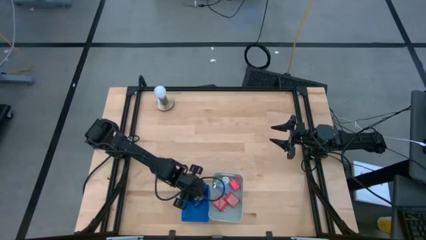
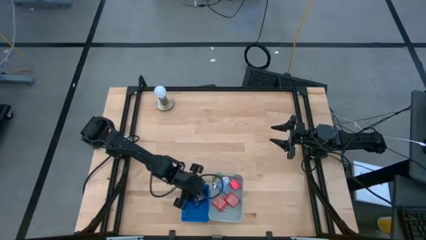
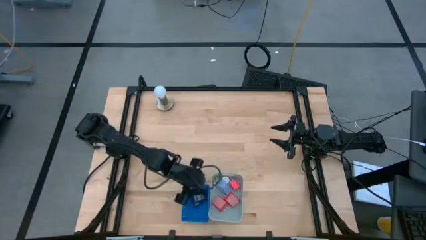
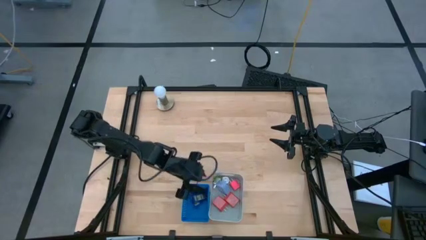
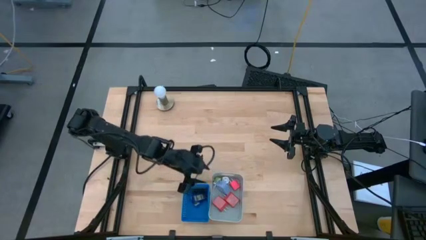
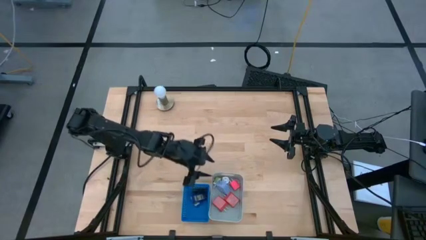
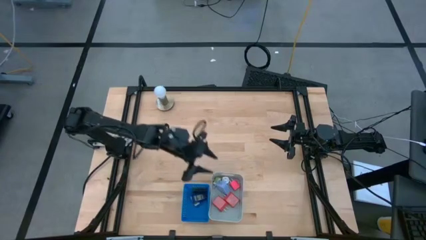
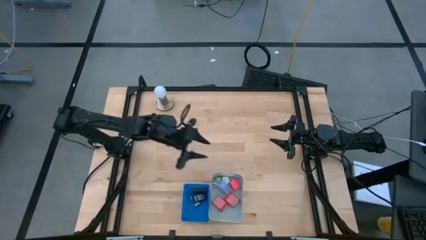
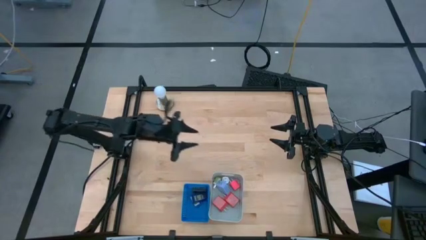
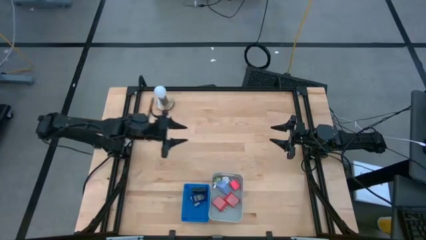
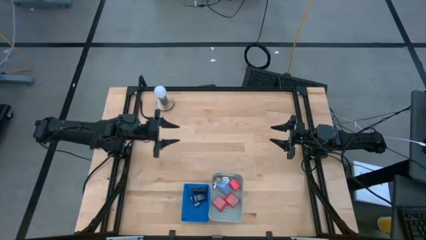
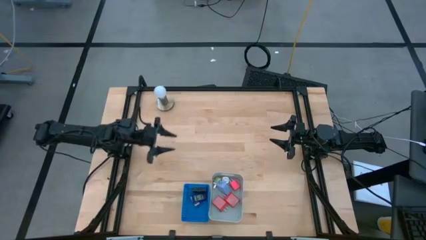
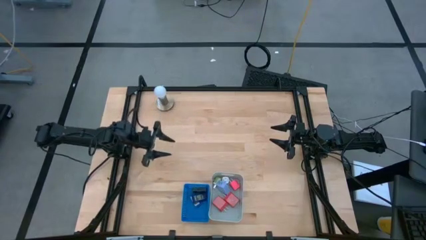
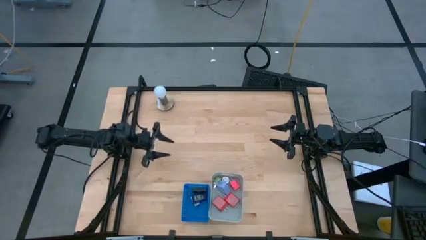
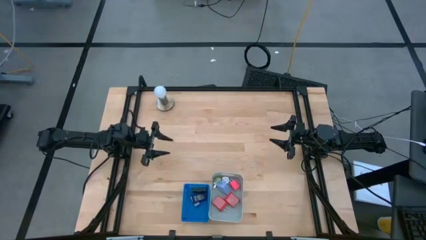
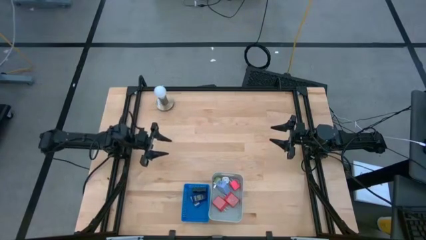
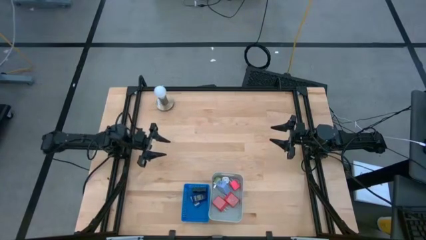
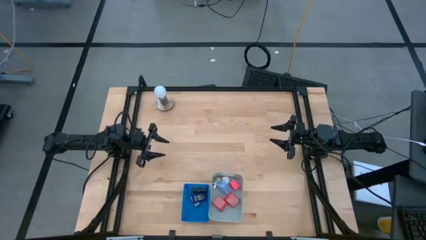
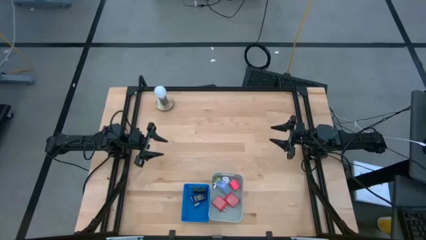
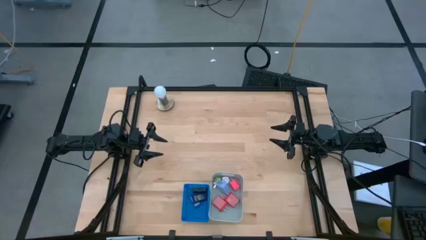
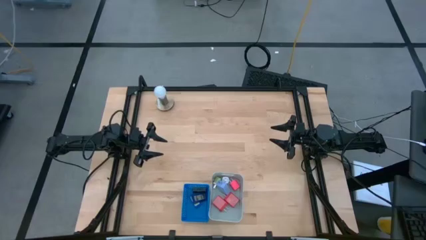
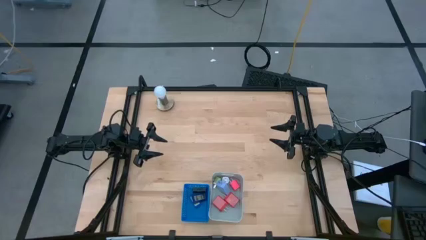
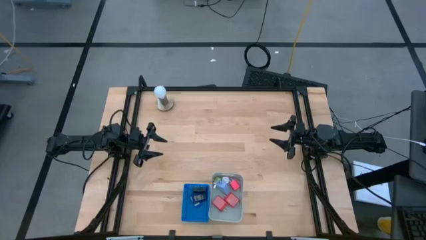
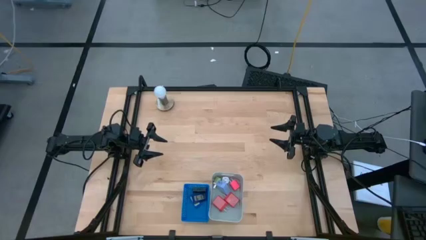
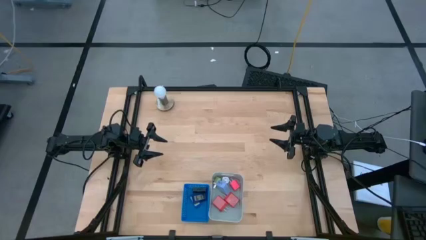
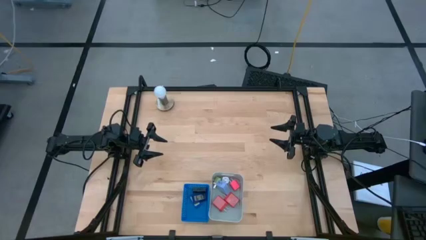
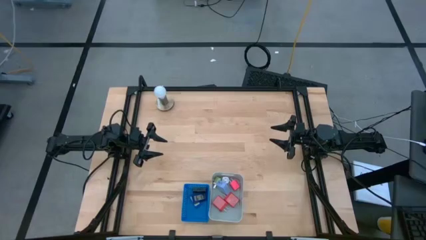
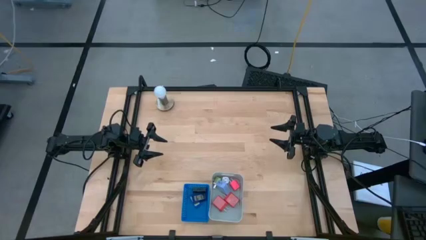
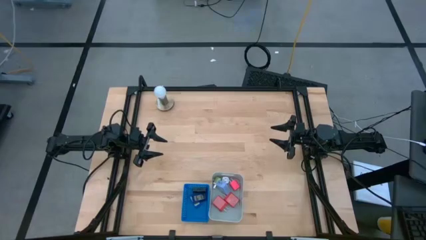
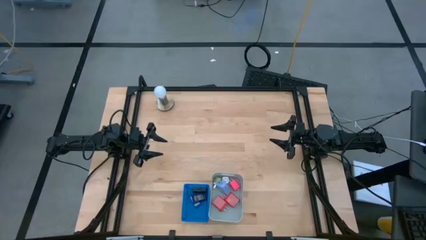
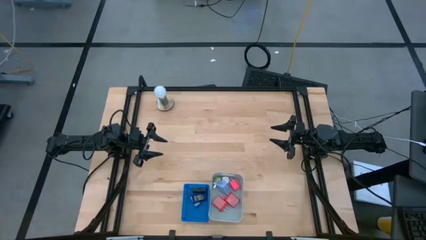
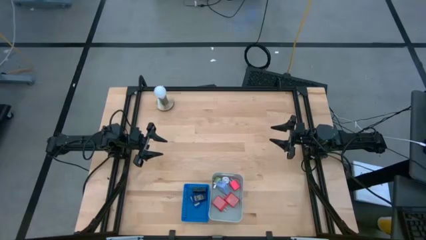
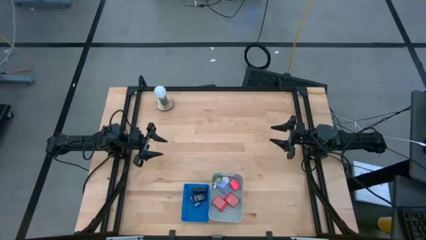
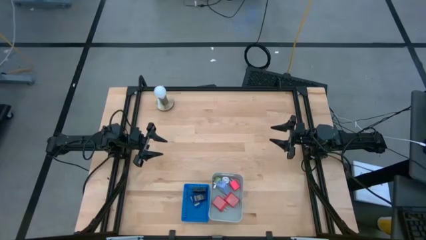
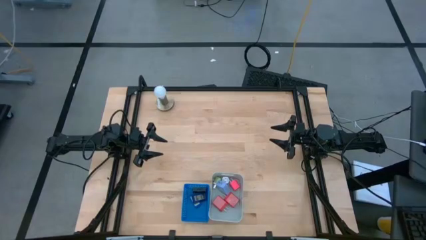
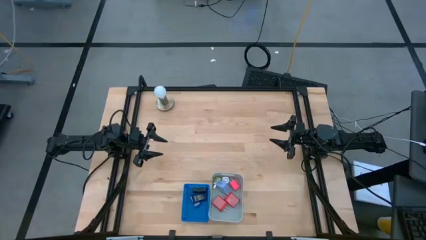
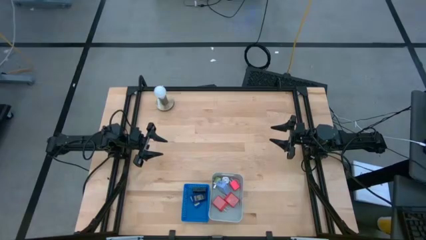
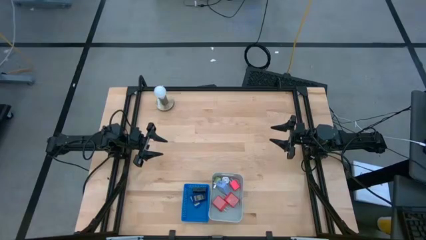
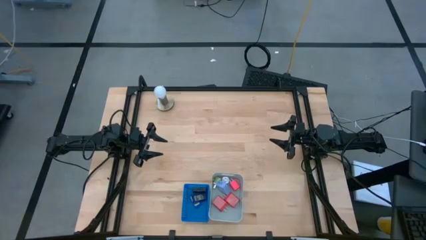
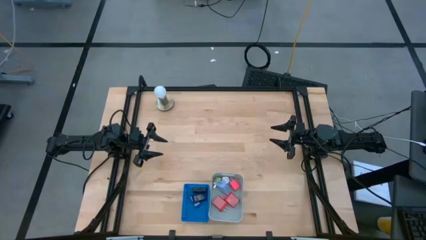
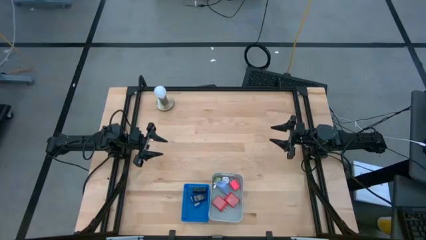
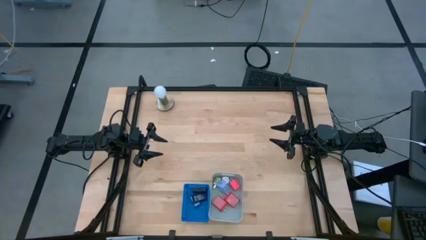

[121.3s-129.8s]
Task: Pick & Place Office items
Return to Home Position

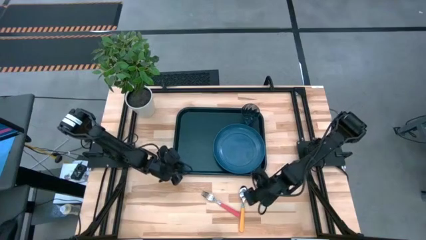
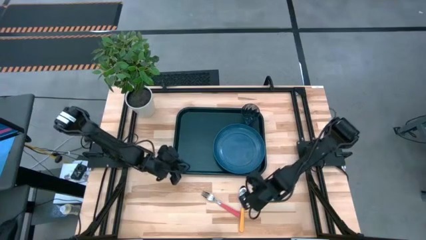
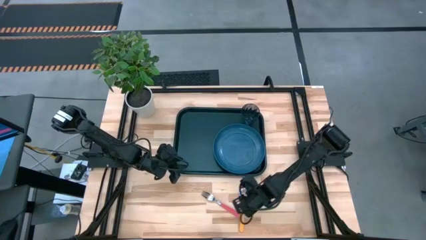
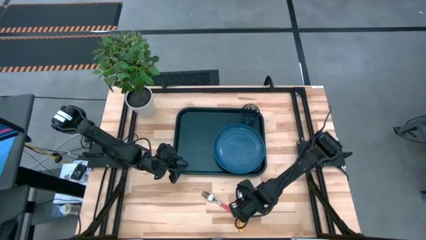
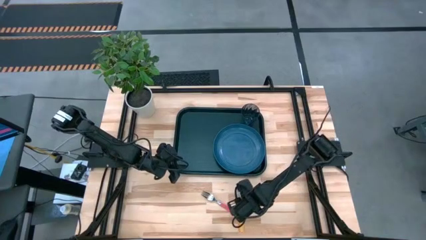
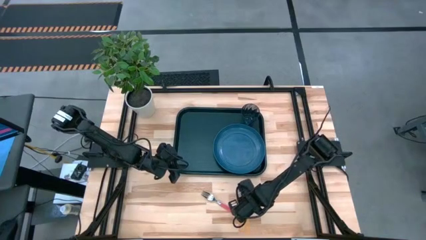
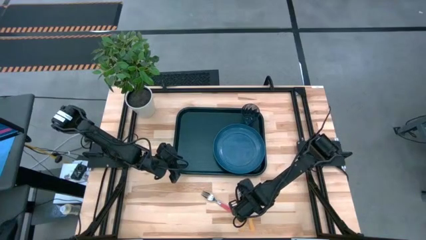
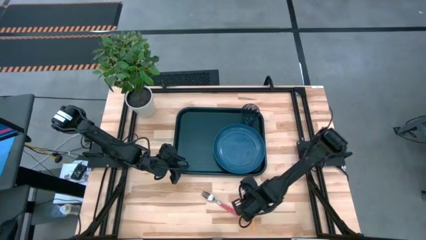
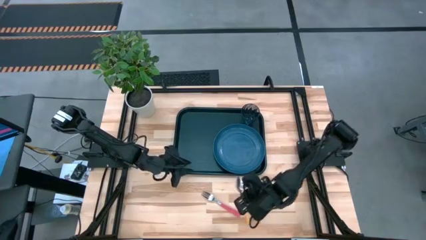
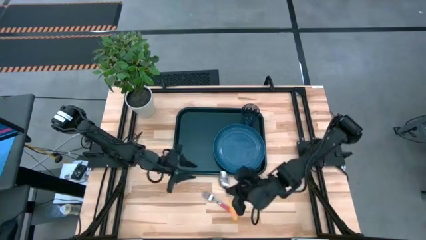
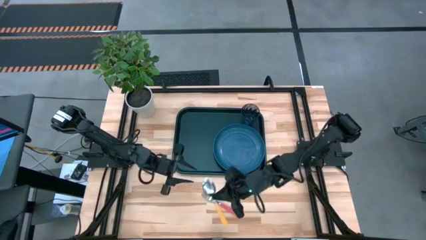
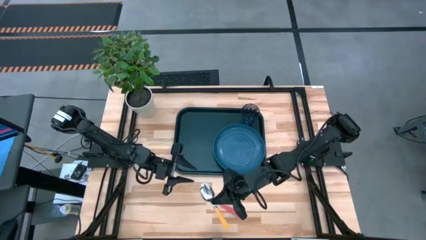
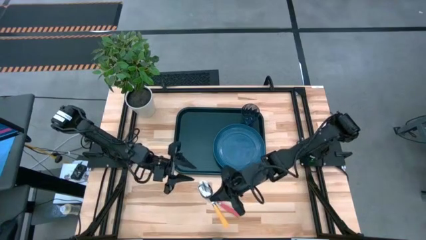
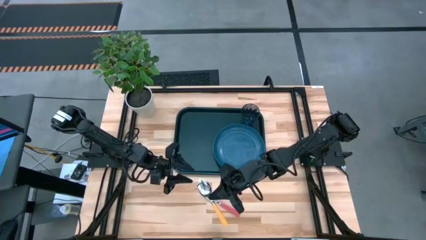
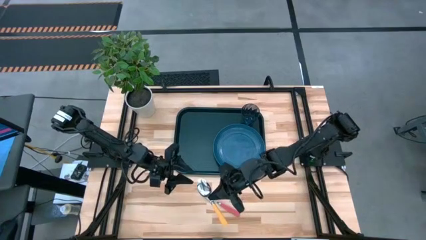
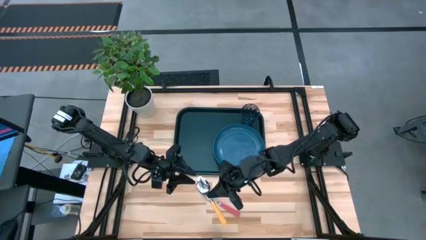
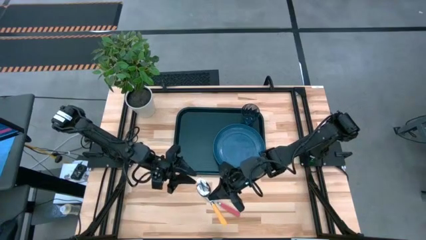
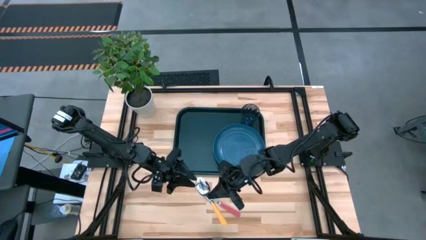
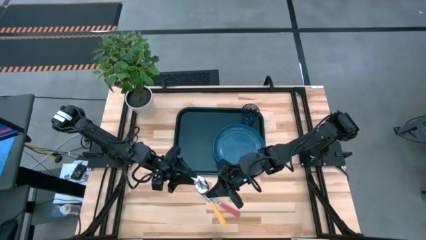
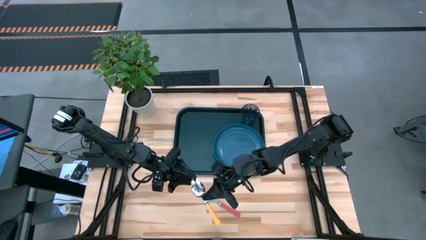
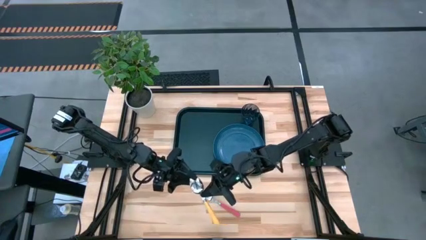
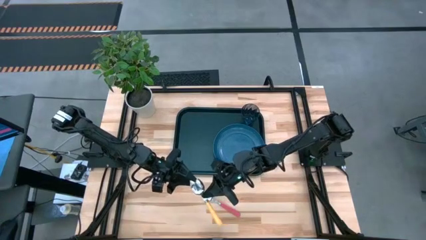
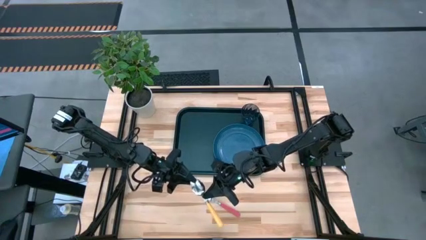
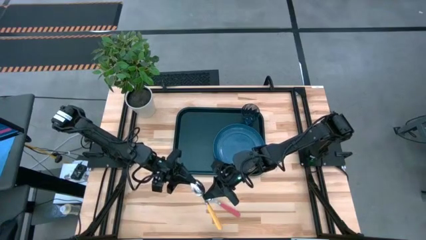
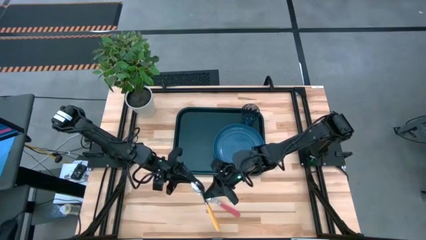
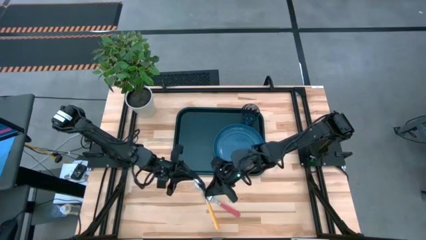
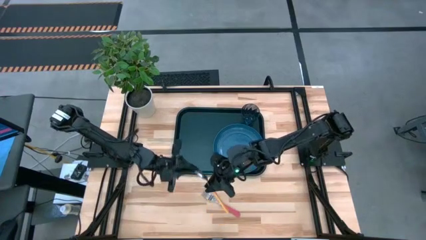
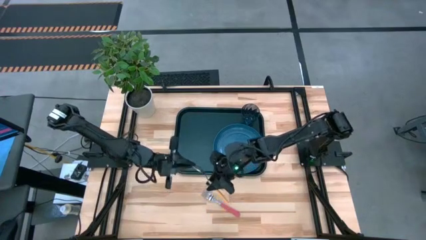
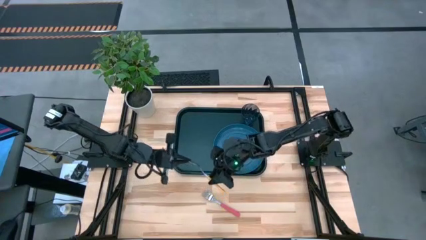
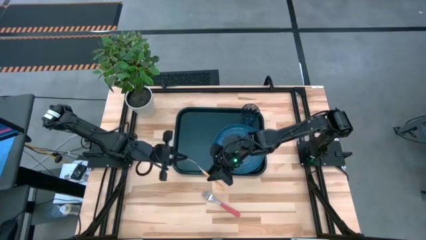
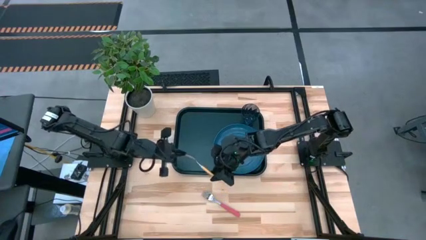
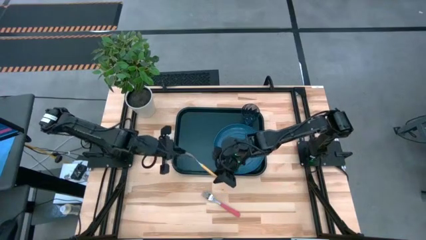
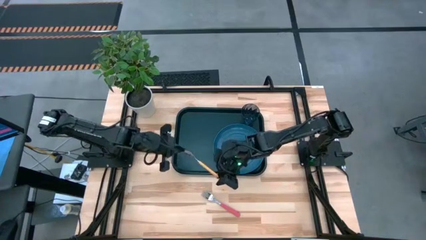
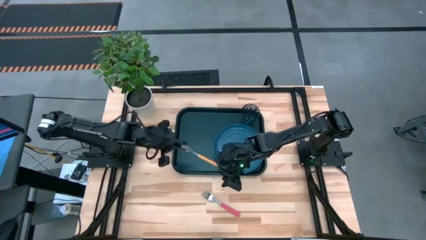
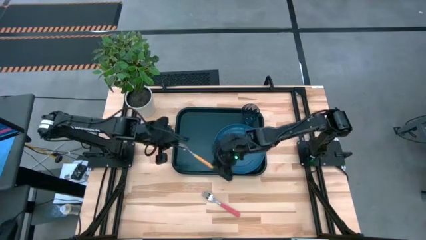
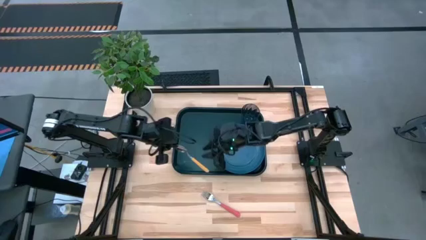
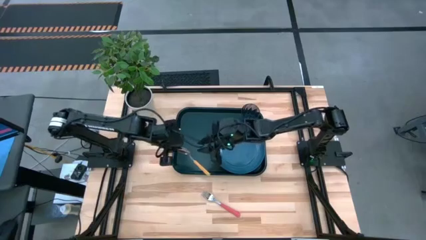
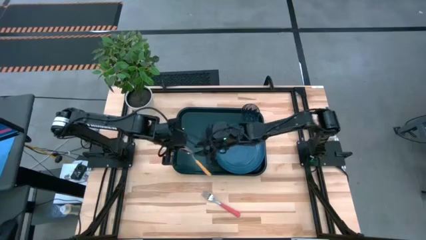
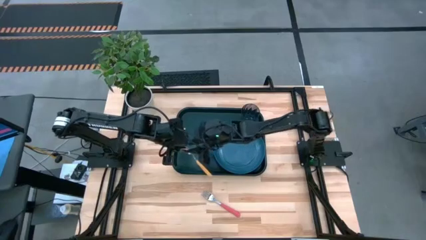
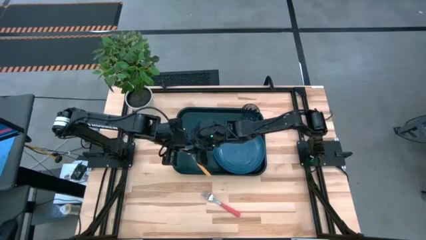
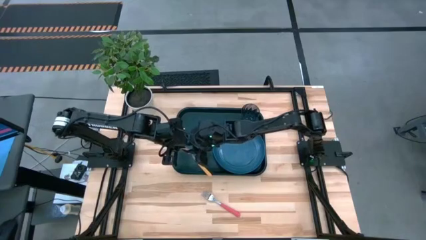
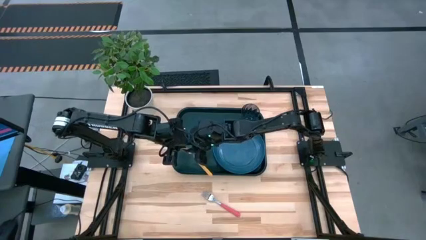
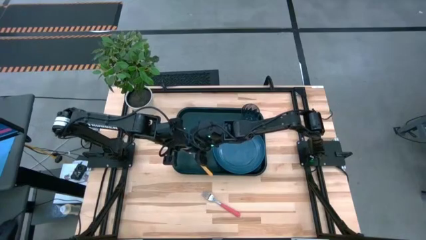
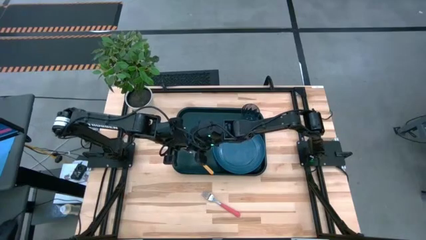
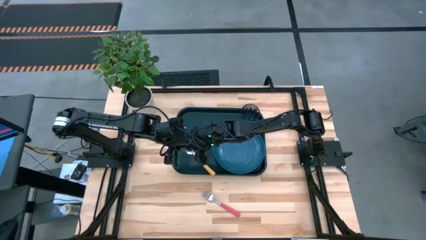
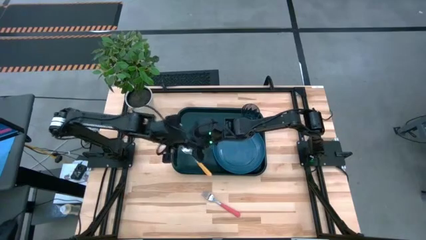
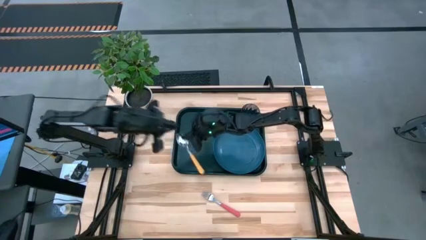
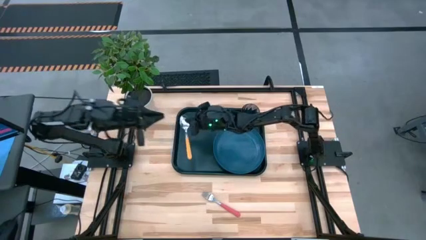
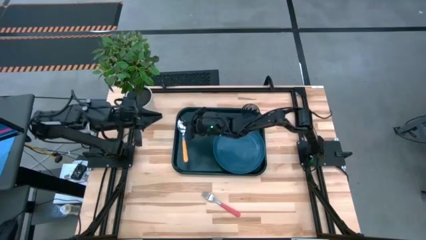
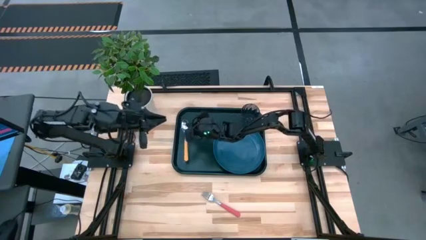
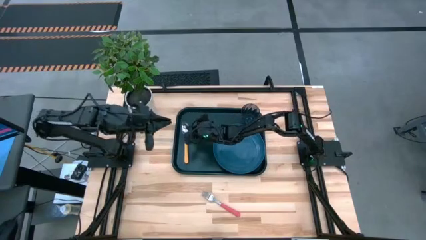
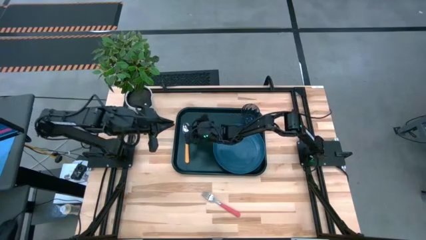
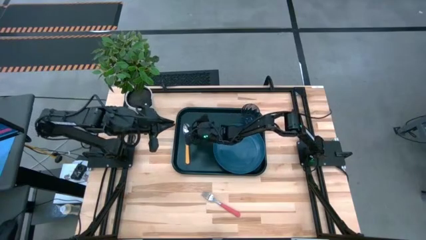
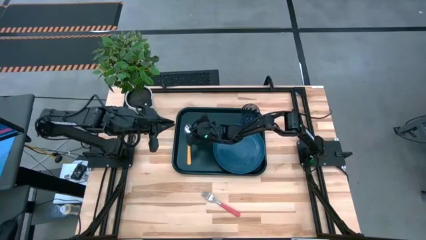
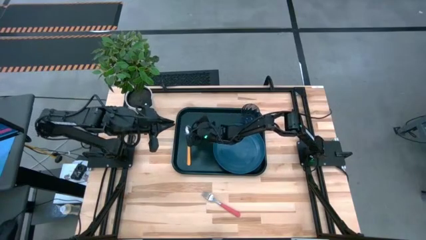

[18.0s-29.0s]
Task: Pick and place plate/cup/fork/spoon on tray
Put the orange spoon to the left on the black tray
